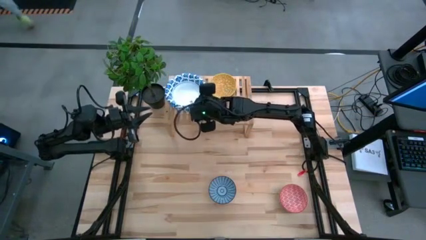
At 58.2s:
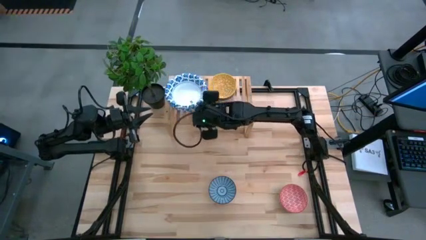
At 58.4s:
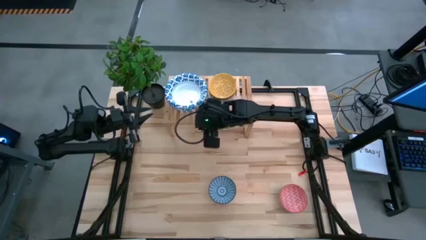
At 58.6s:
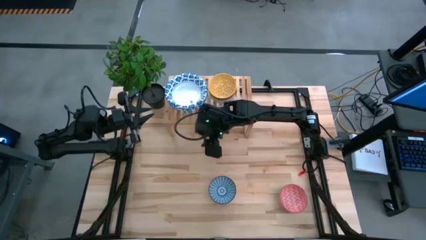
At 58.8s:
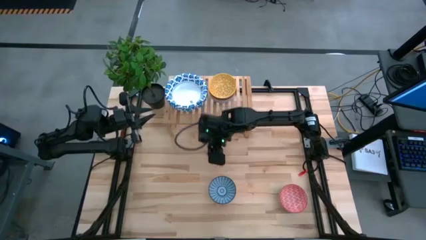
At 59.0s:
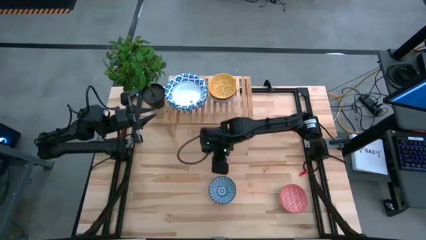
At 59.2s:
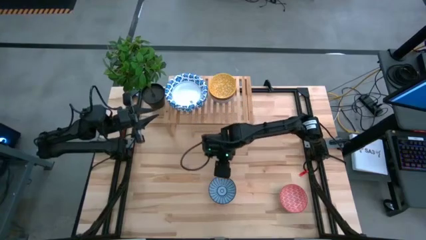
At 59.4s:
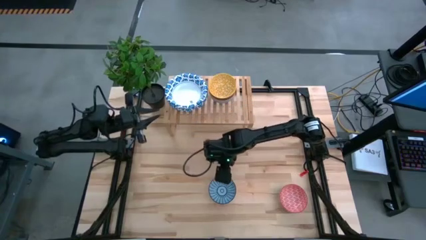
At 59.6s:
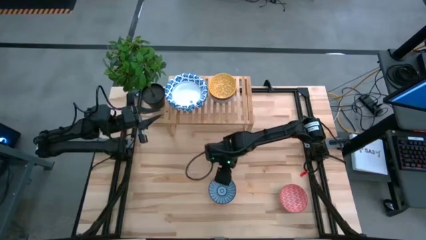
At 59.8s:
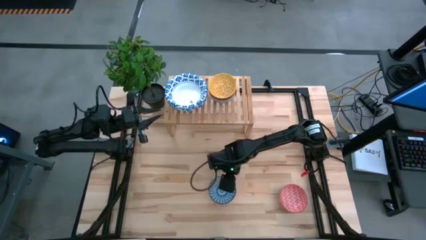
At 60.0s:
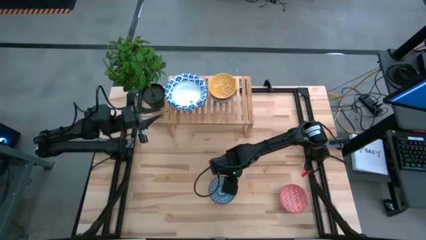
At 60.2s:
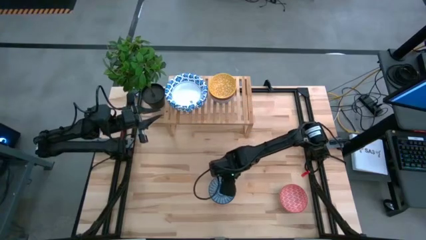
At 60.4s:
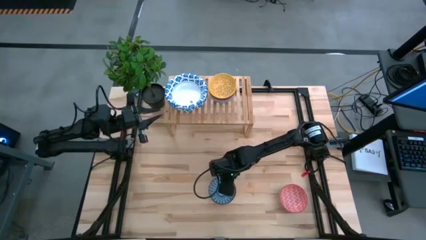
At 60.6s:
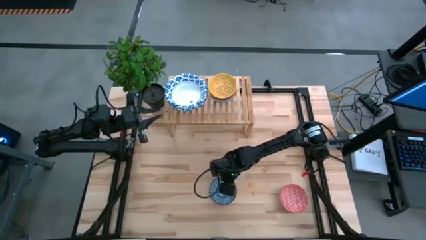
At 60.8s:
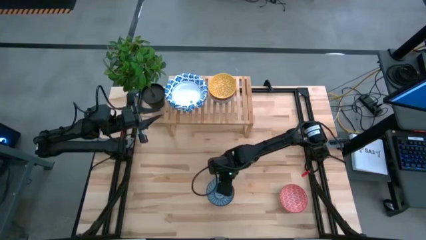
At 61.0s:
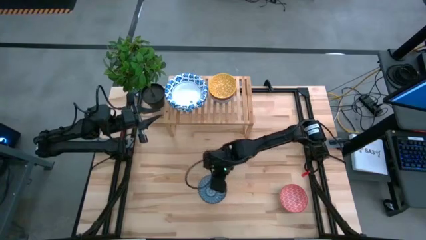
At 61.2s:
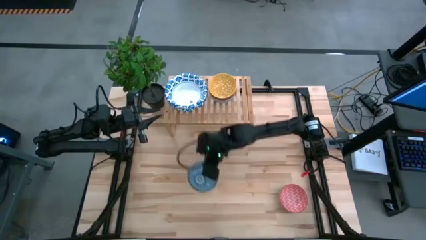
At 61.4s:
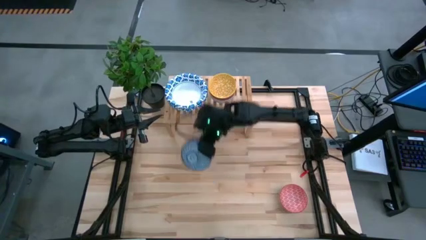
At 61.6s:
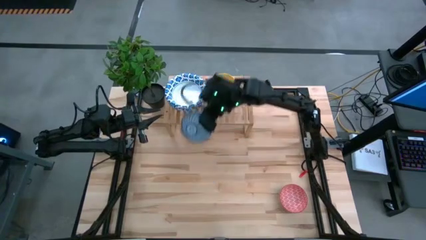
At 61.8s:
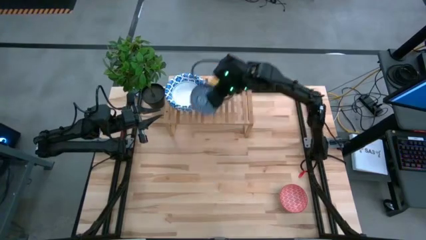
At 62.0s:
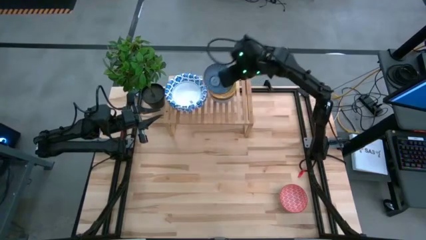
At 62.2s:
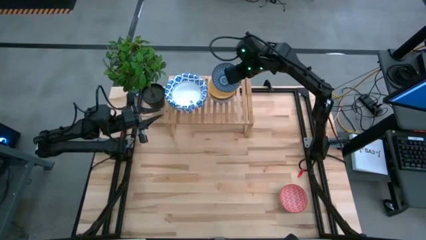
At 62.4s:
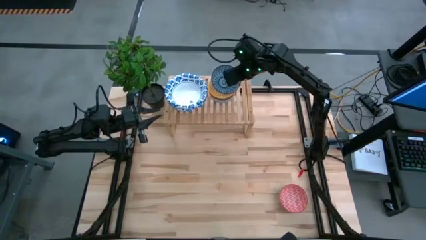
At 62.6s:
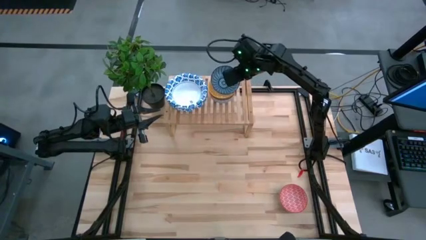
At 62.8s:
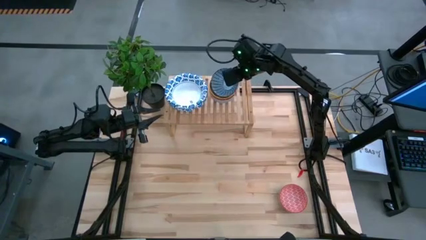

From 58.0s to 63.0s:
Task: Place and stack bowls onto a shelf
Stack the blue patterned bowl on top of the blue yellow patterned bowl on the shelf

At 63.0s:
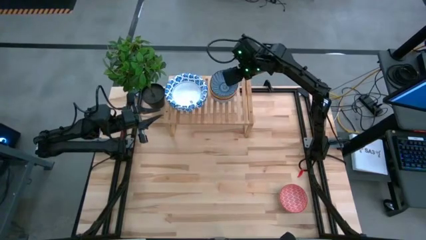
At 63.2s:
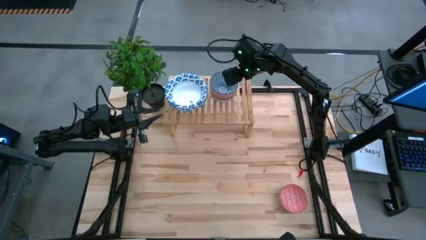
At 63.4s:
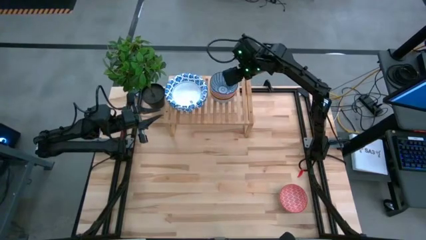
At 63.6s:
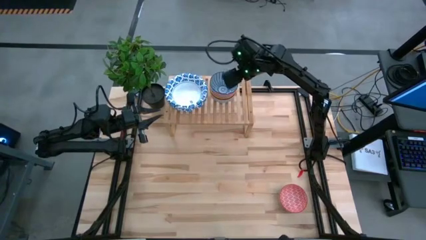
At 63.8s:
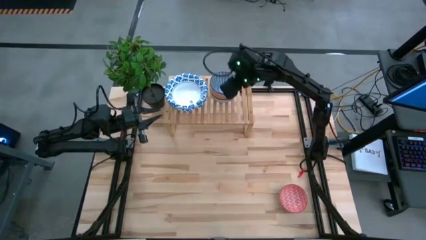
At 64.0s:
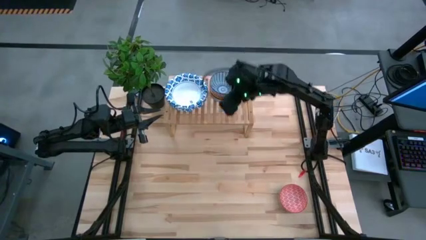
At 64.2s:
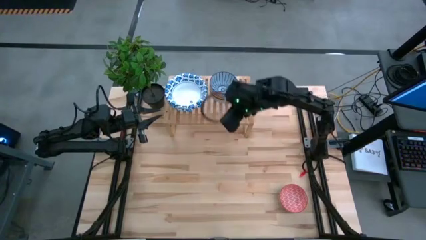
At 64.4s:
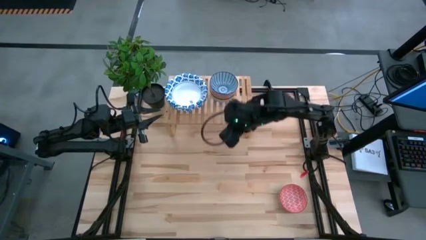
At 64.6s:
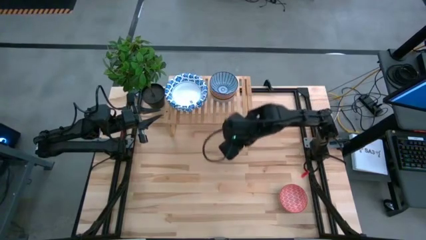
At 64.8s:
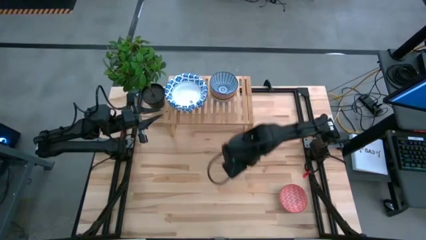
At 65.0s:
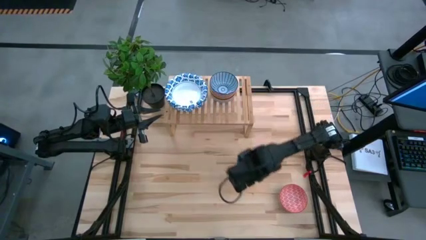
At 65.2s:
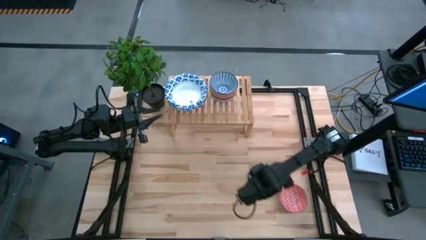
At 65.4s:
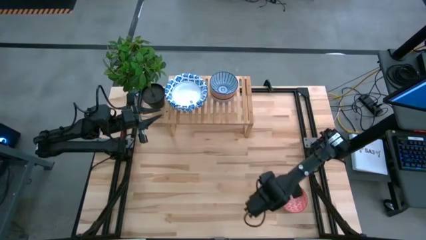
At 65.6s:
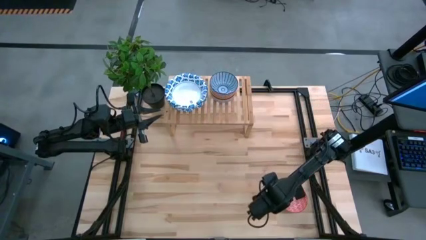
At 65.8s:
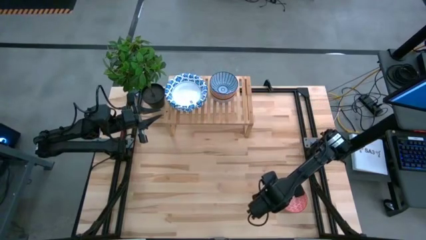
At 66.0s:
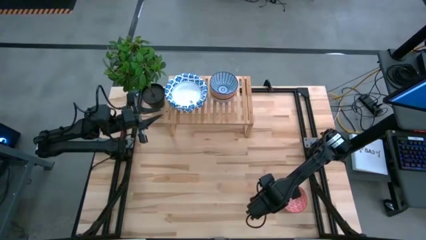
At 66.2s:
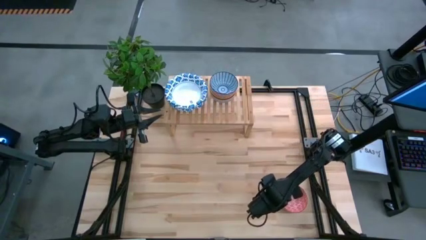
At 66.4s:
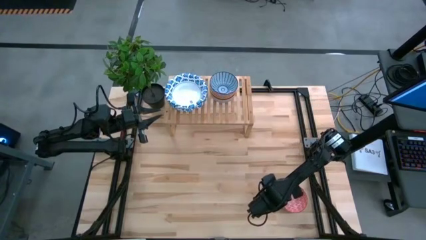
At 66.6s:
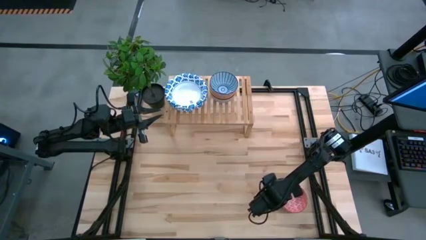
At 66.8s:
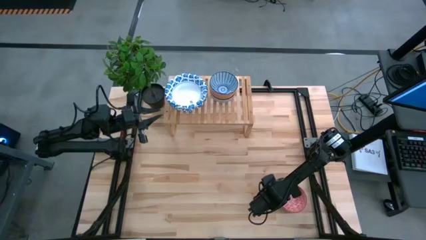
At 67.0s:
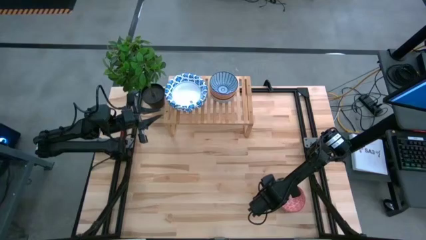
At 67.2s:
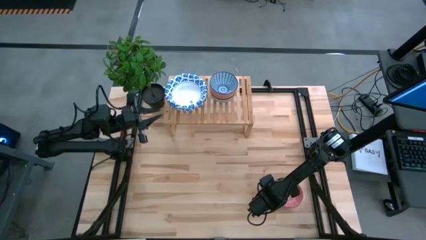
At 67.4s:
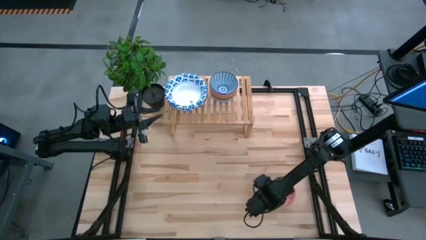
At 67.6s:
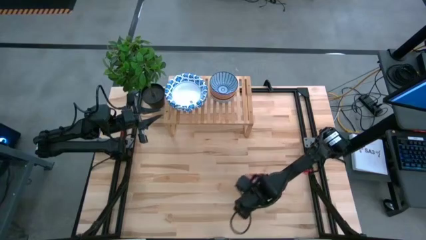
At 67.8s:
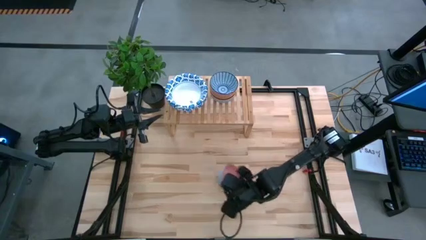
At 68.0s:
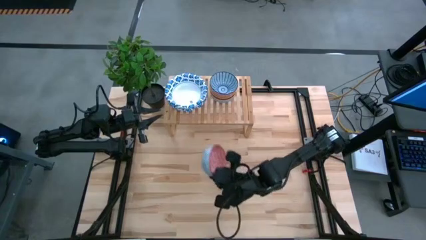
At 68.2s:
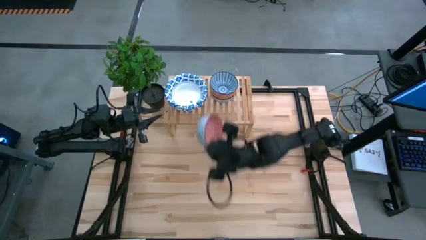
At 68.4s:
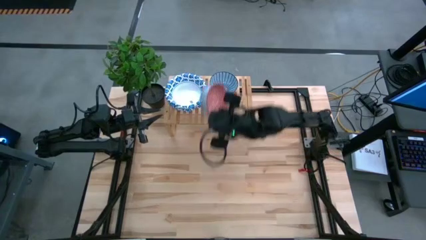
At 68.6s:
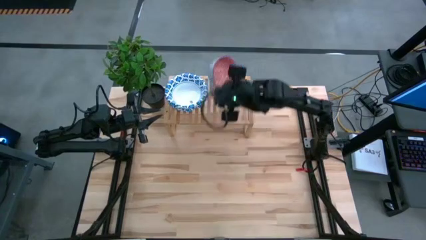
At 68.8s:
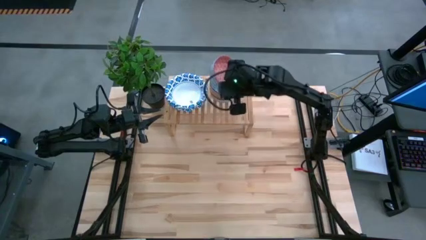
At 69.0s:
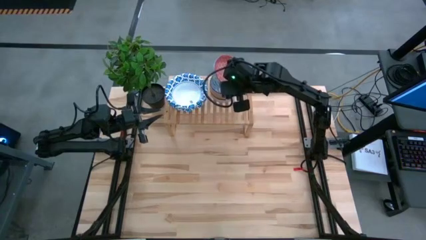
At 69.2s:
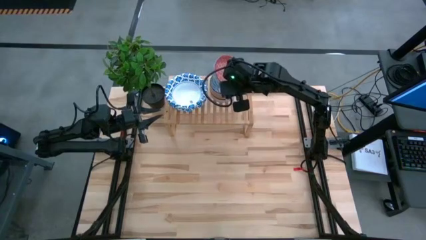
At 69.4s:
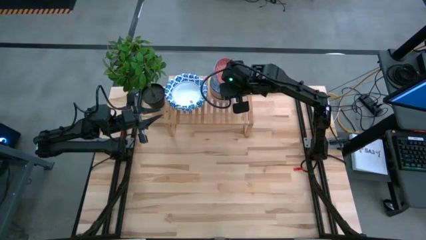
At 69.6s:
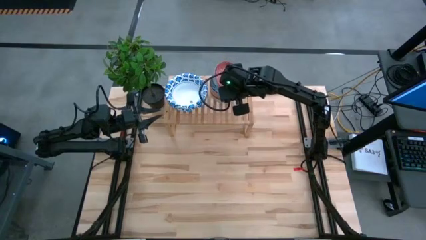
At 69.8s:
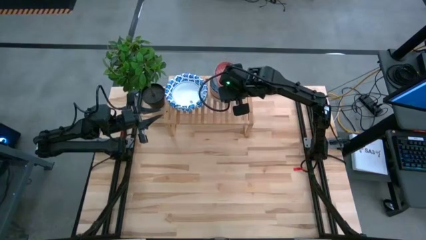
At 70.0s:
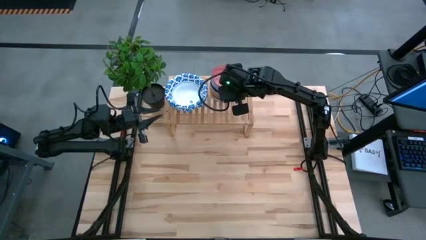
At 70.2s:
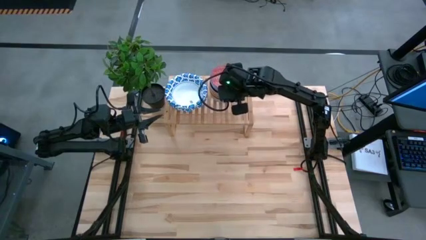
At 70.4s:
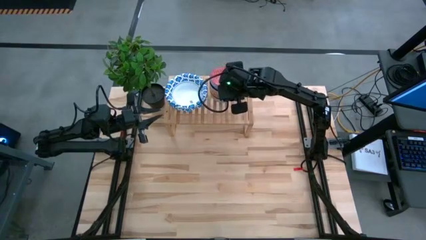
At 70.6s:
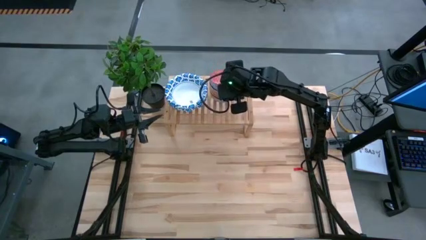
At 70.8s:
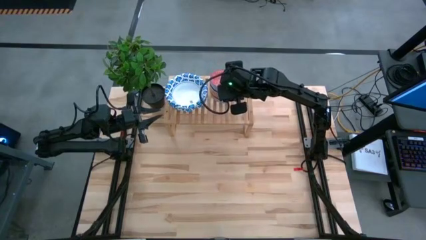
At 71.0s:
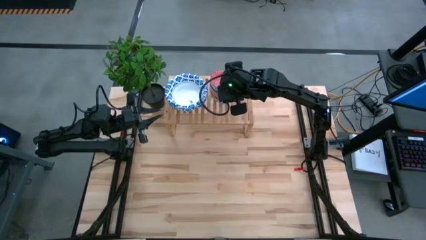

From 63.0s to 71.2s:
Stack the red patterned bowl on top of the red blue patterned bowl on the shelf

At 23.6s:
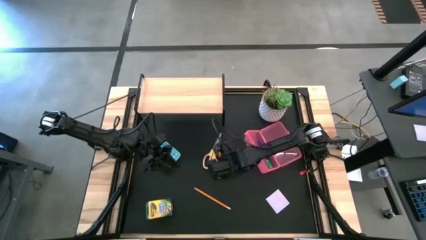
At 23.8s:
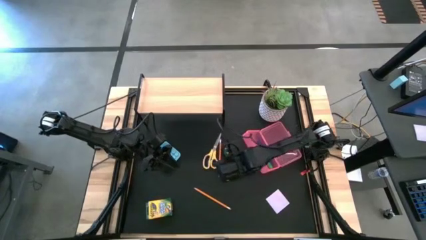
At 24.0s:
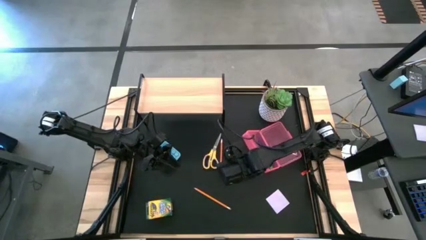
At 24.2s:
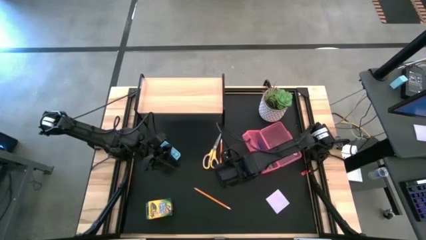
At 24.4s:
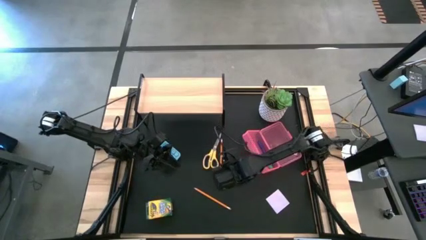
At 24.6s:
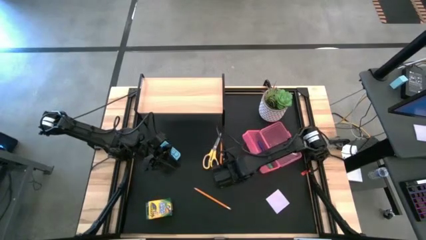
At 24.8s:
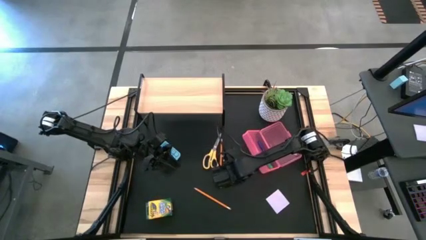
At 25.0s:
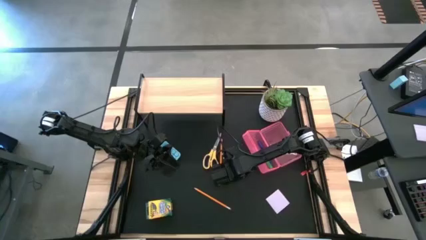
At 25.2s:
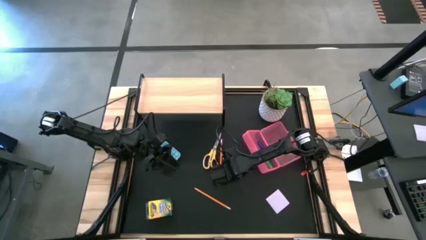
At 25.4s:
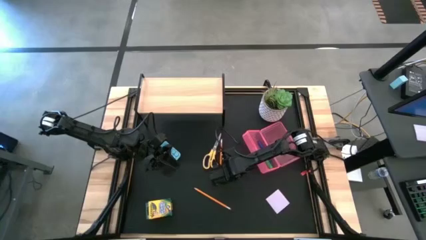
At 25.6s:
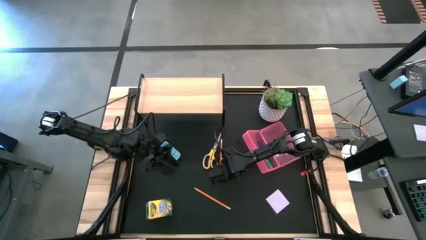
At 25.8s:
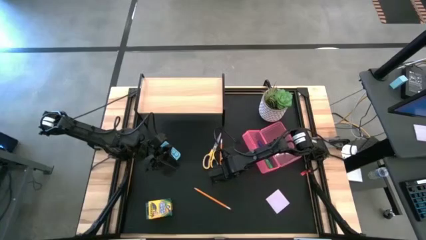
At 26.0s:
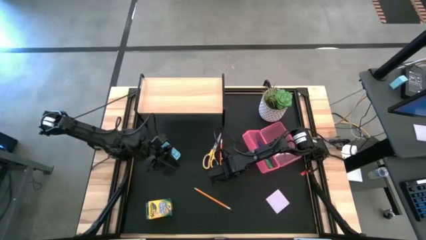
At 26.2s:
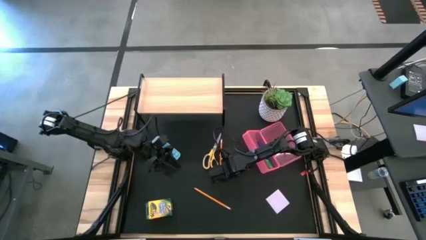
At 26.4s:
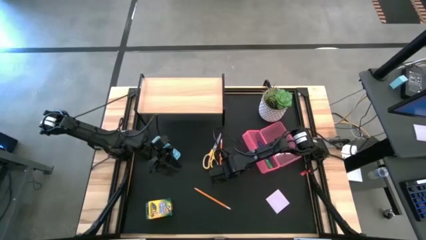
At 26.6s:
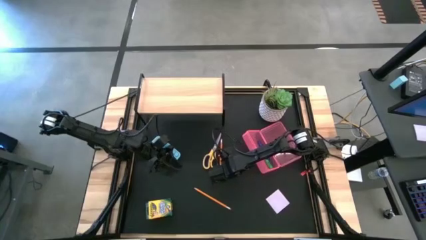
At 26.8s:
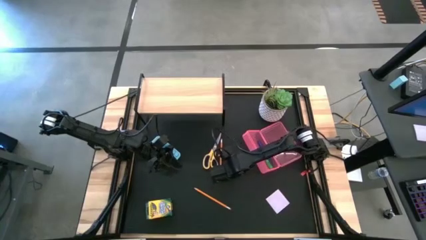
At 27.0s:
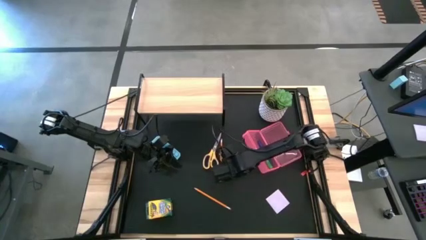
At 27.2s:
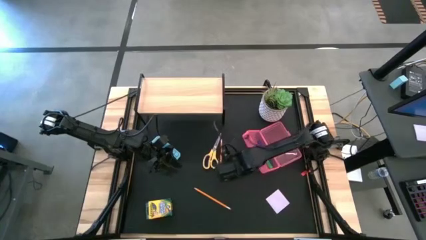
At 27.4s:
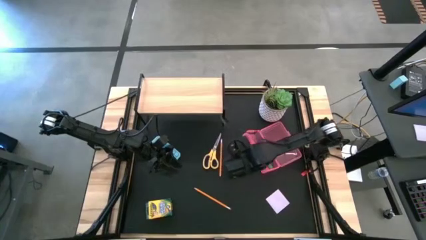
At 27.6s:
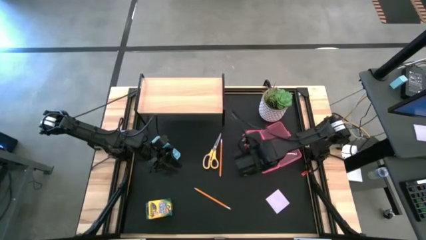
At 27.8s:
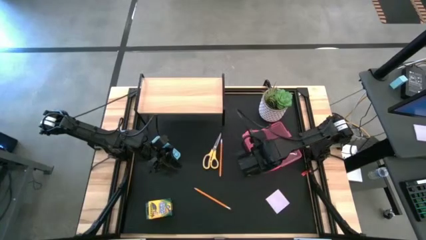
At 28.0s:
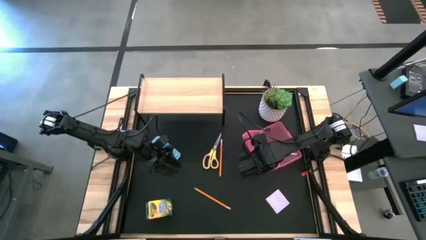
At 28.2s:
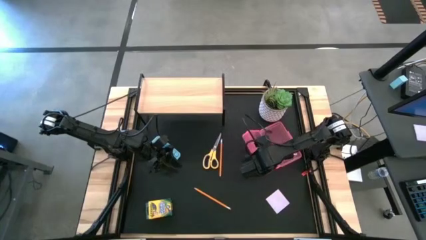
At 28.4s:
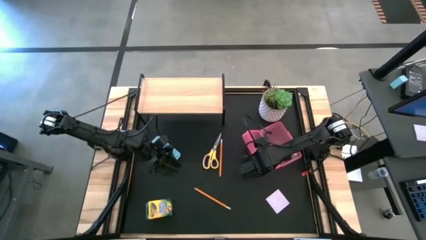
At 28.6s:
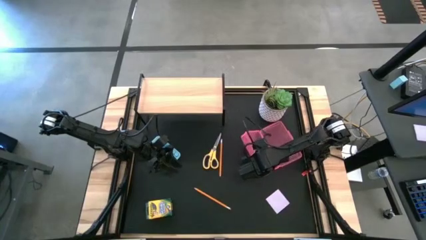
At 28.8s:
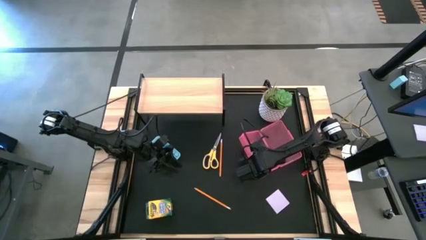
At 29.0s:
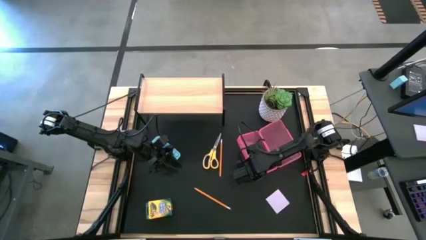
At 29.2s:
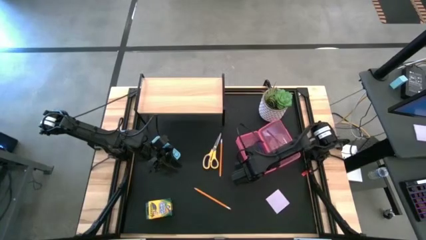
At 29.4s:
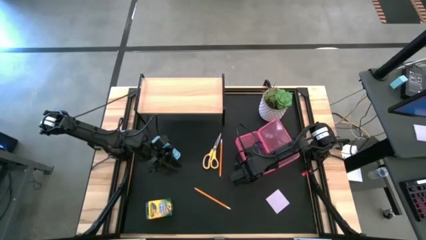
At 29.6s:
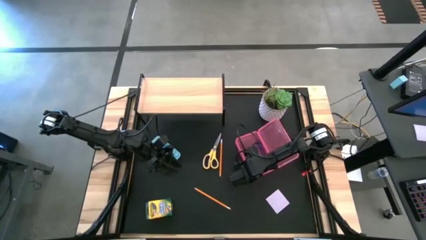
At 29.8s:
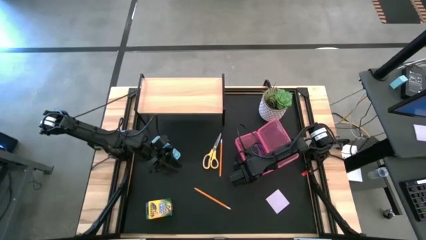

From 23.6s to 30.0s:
Task: Pack school essentials
Put the green pen into the pink supply box
